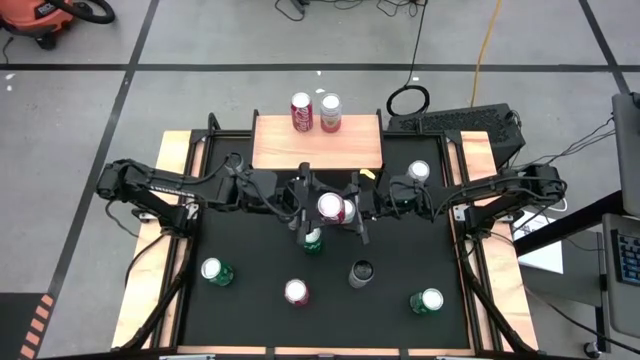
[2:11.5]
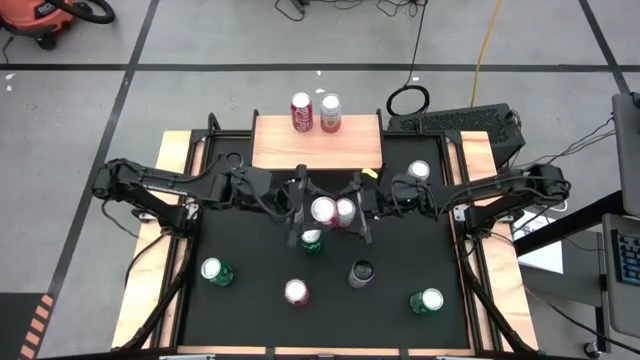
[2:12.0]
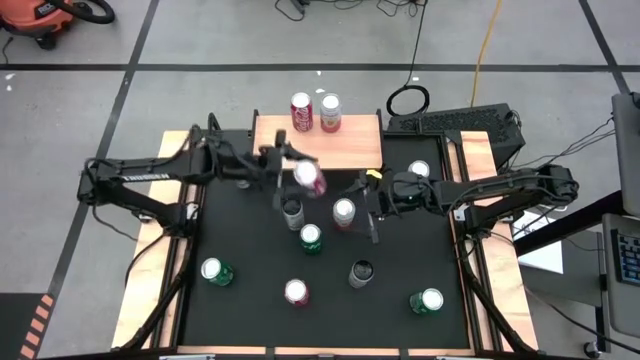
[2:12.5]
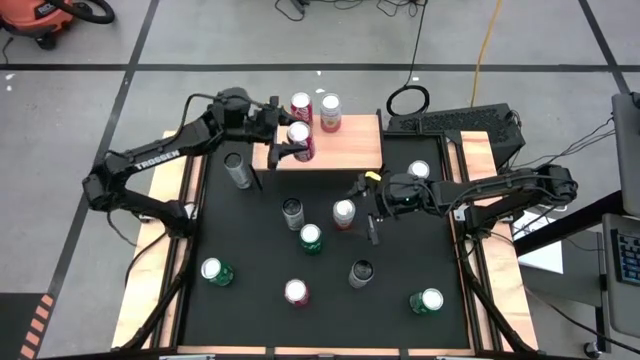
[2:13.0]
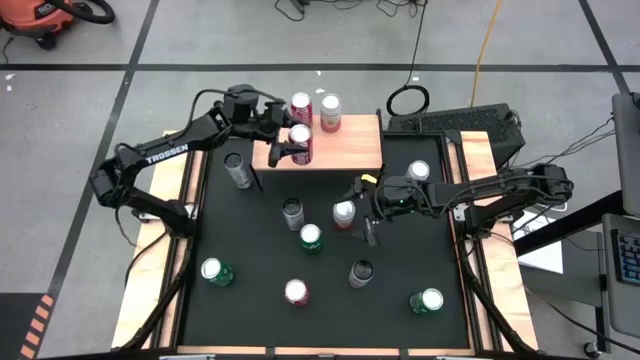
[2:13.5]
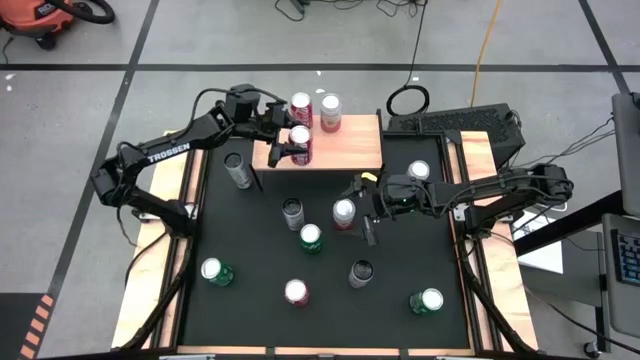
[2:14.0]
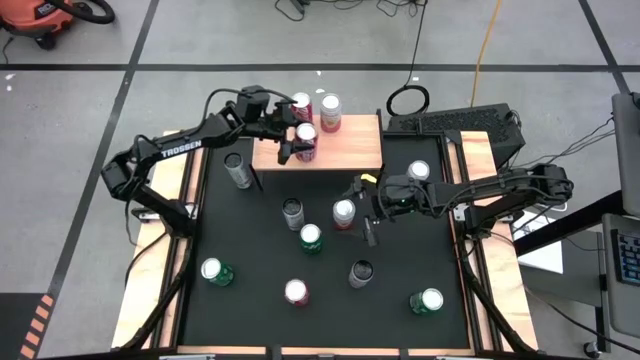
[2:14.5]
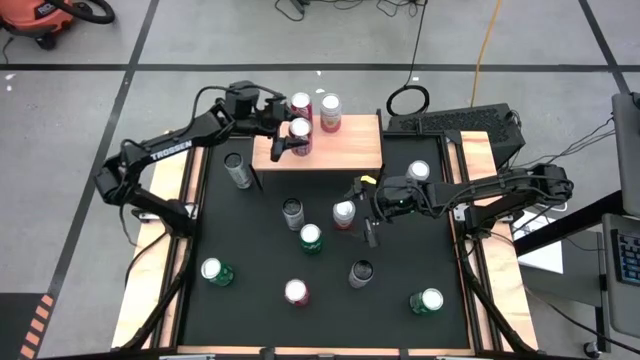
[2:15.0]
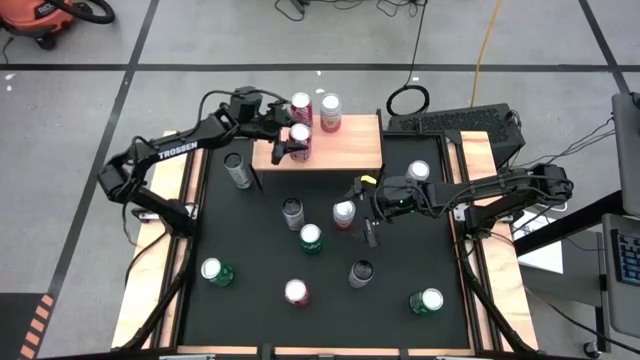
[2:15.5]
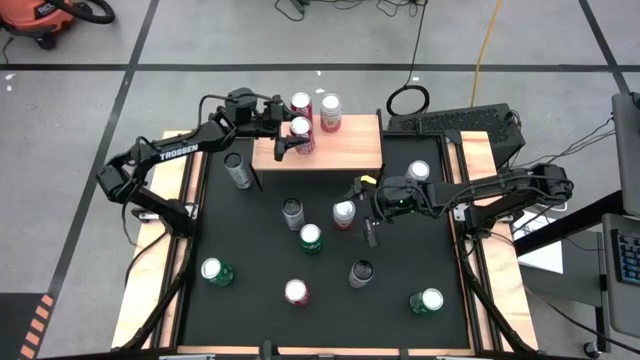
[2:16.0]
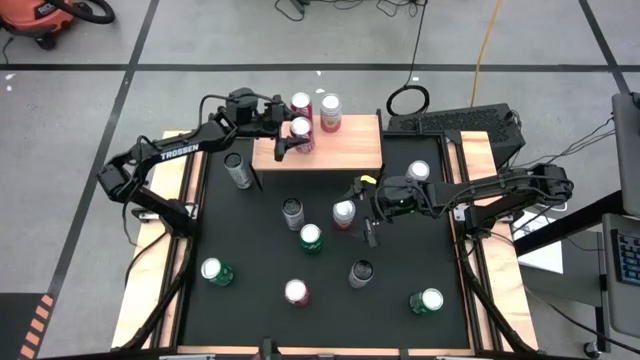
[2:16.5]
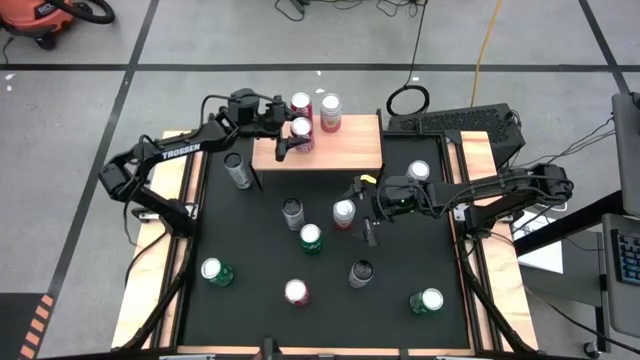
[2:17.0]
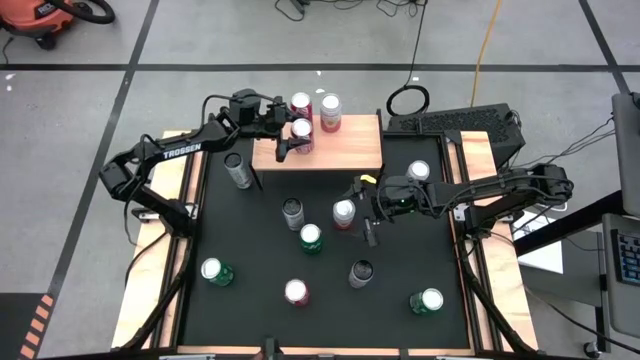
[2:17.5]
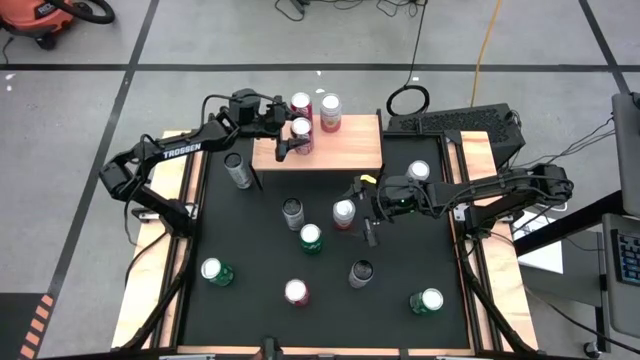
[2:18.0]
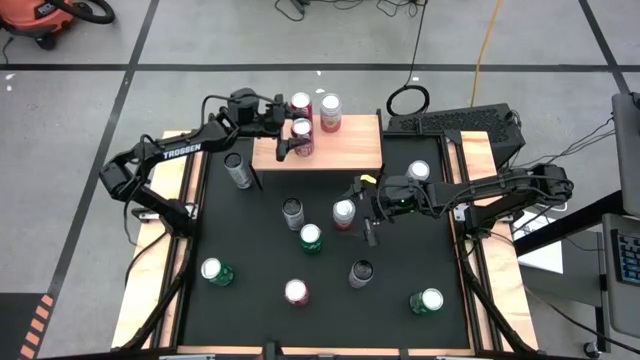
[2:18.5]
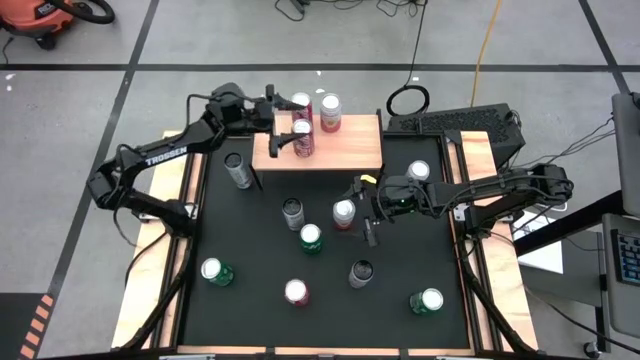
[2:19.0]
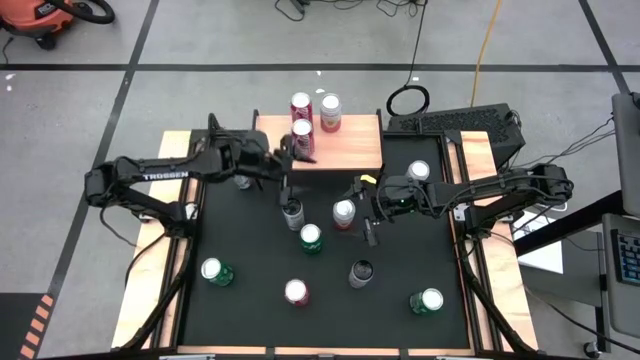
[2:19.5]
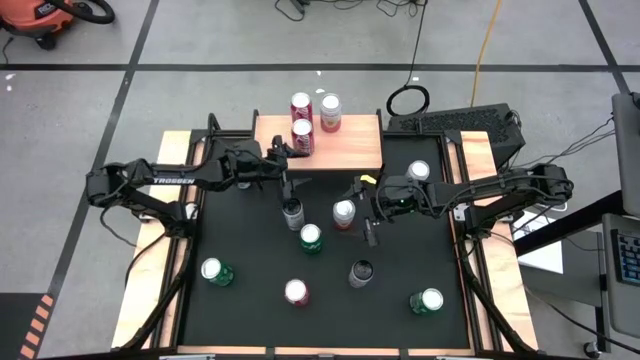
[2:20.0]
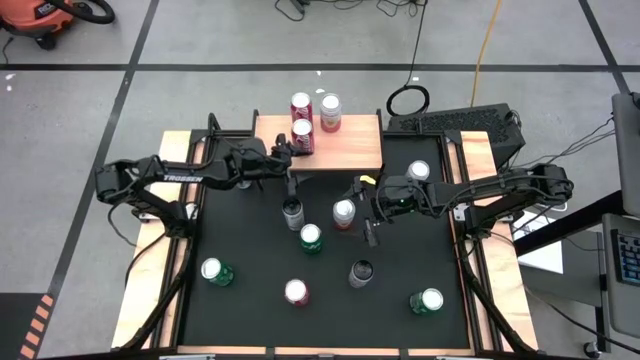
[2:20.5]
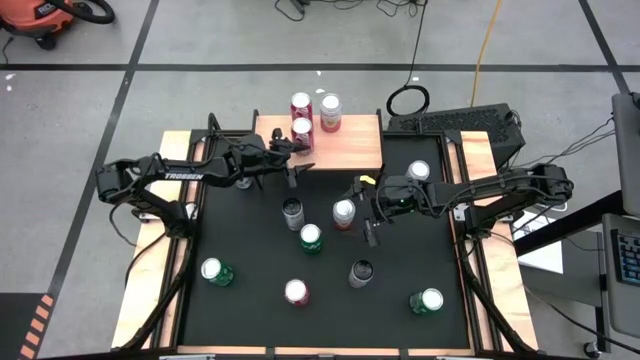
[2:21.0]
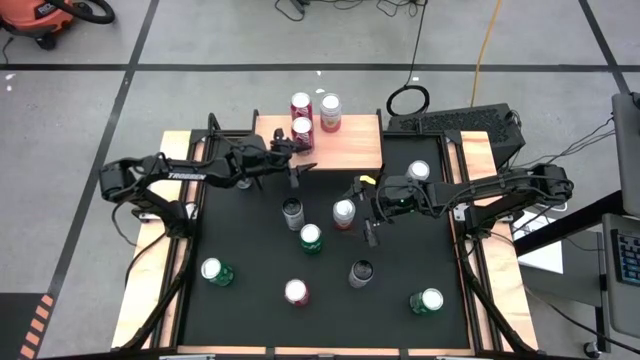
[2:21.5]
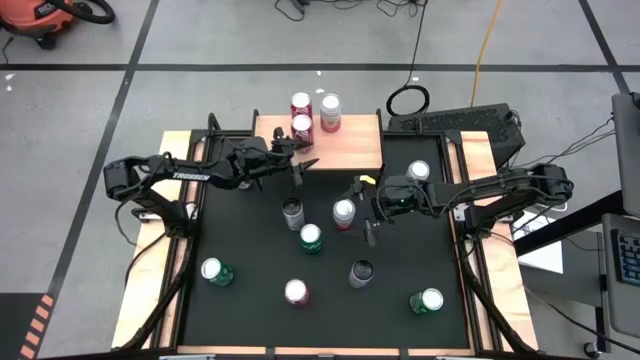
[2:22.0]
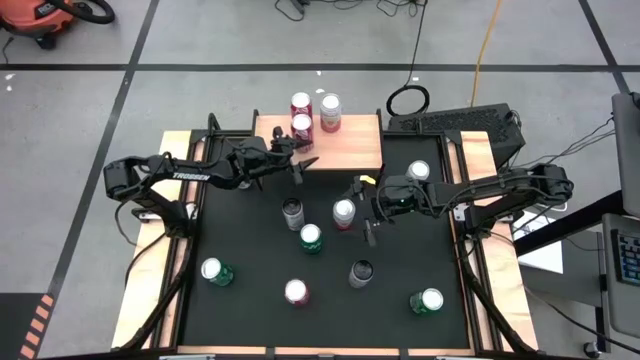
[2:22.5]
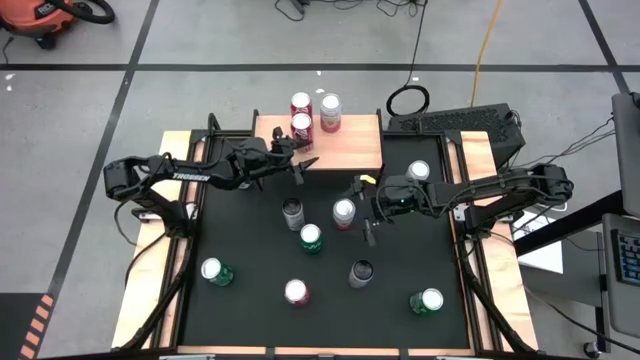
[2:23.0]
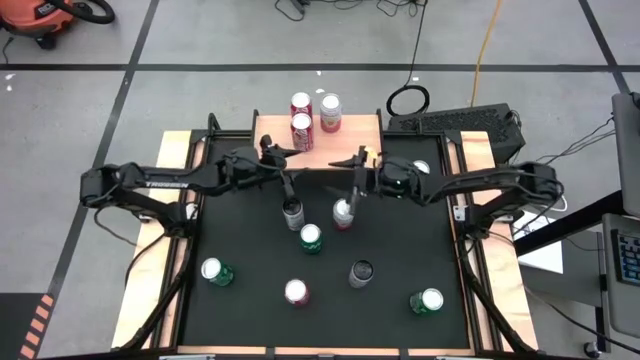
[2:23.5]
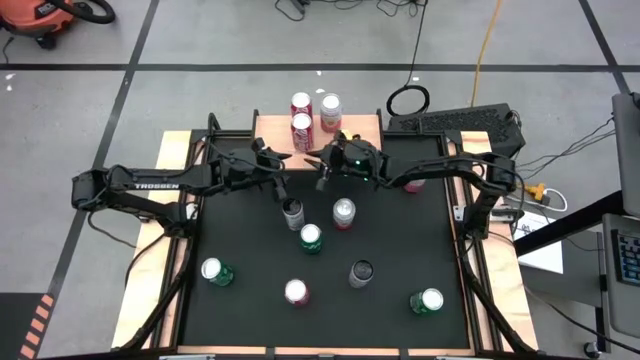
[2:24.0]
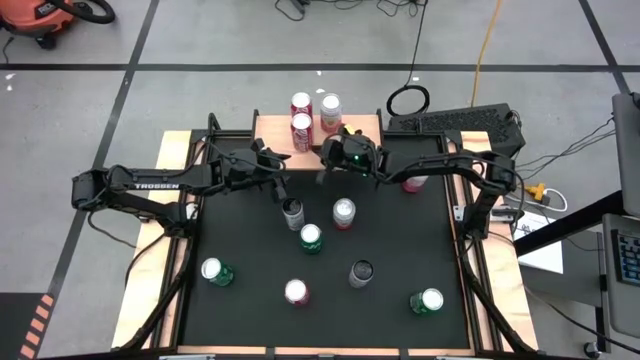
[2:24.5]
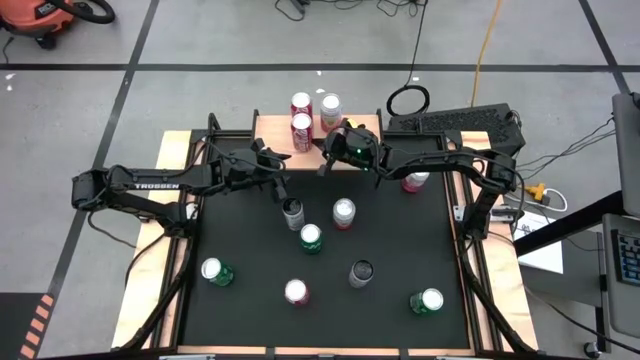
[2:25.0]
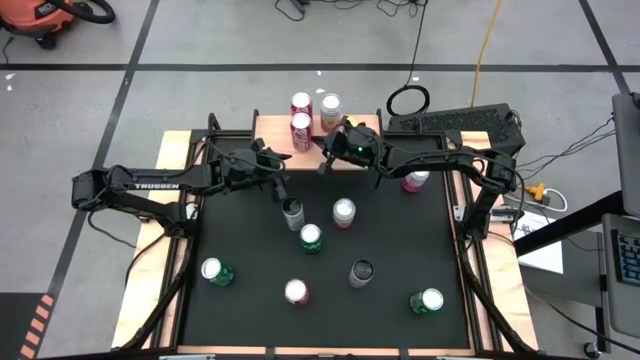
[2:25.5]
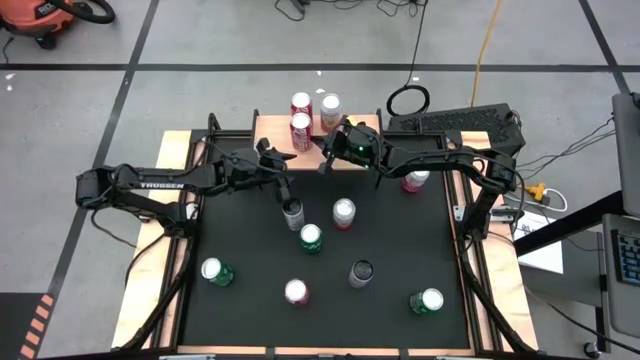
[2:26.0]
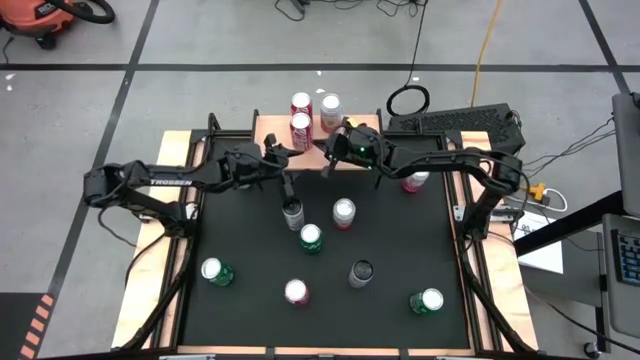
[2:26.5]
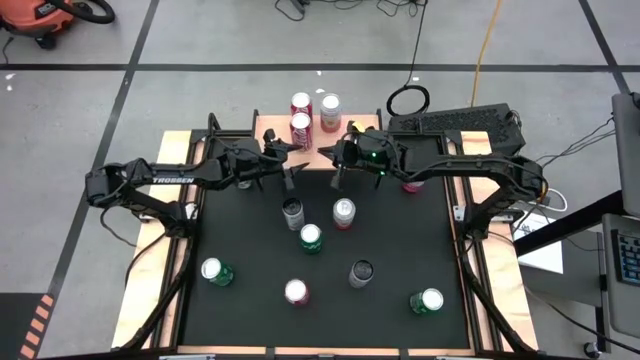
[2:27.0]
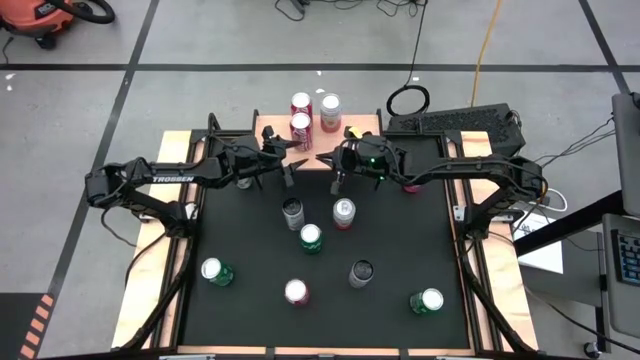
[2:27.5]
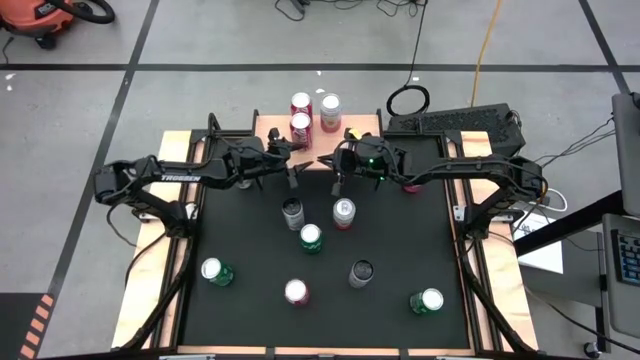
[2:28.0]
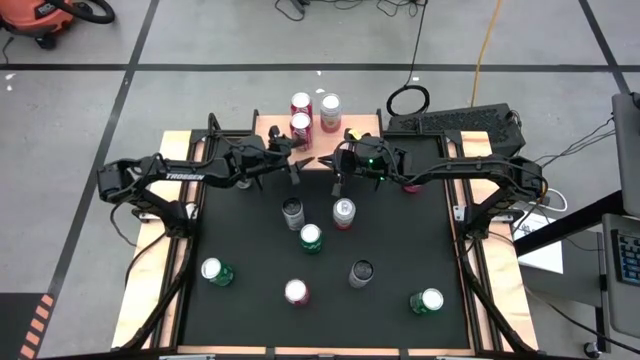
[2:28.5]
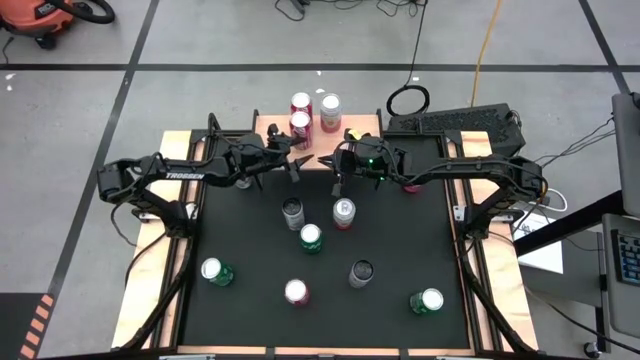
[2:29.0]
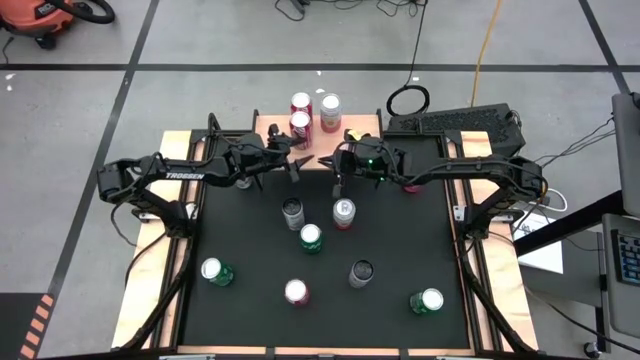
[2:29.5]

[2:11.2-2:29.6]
Task: Place canned beverage on shelf
Put the top red soda can on the shelf aligned with the other red soda can

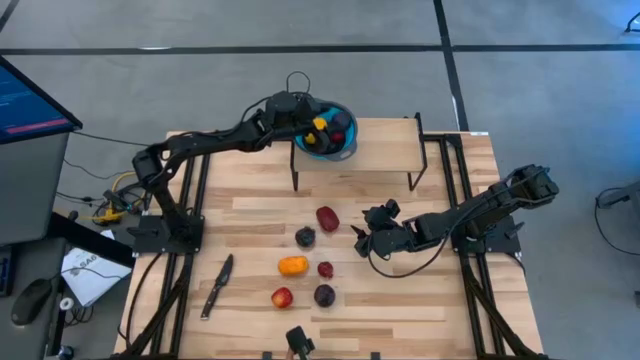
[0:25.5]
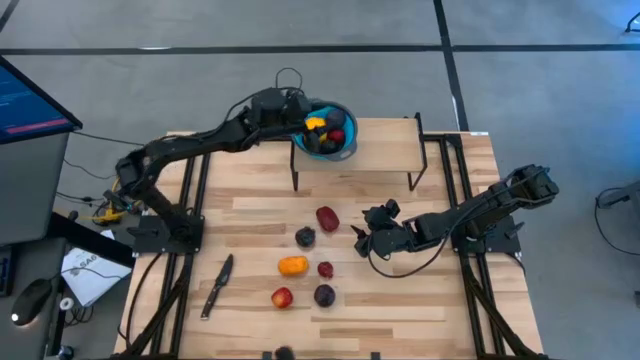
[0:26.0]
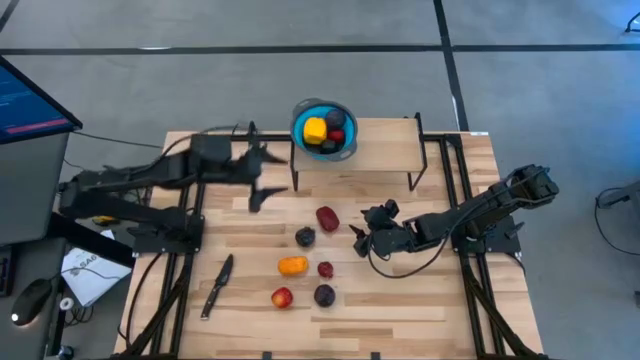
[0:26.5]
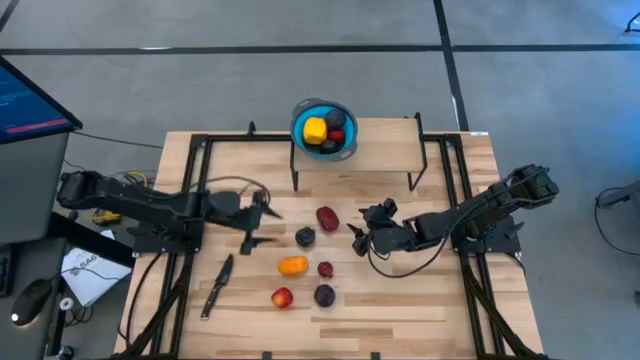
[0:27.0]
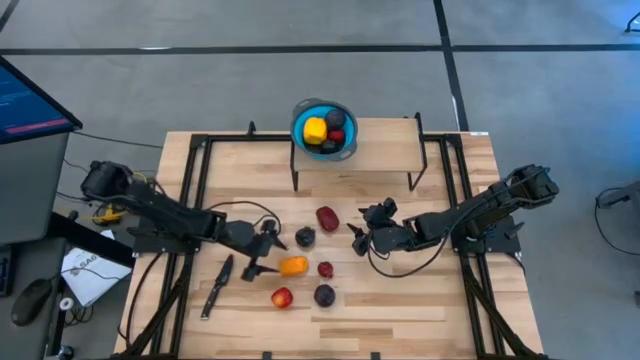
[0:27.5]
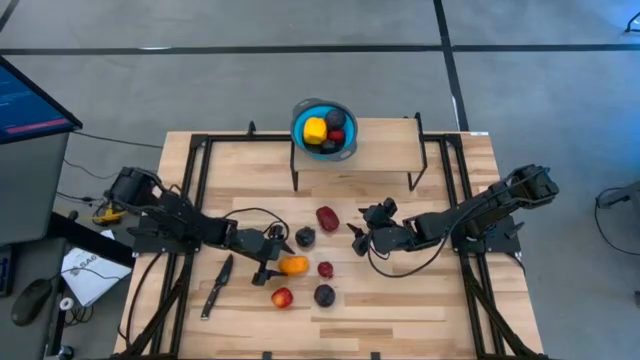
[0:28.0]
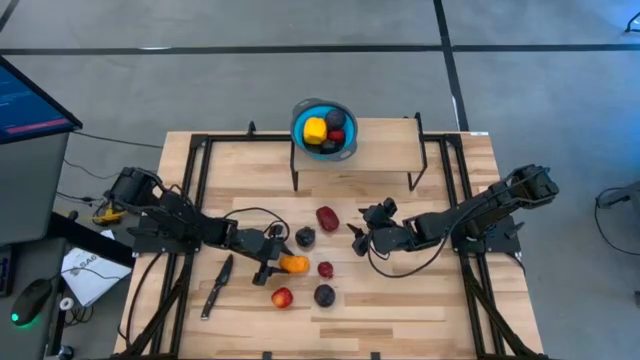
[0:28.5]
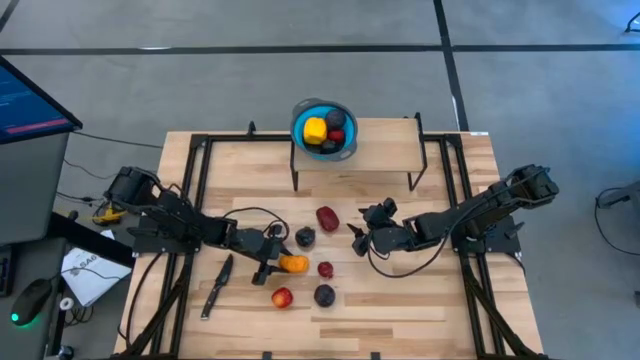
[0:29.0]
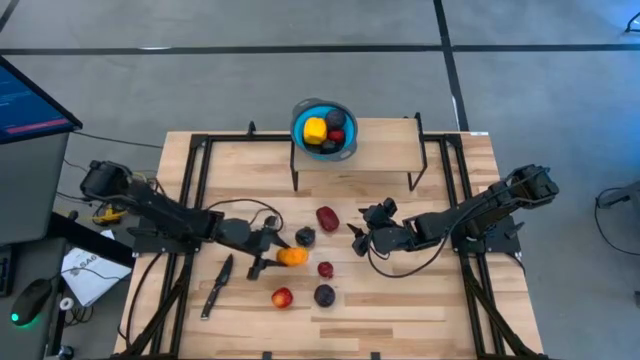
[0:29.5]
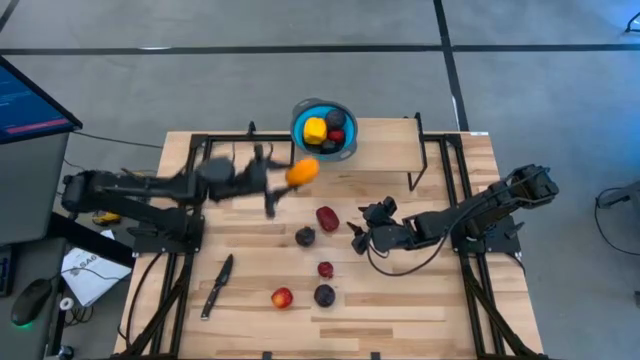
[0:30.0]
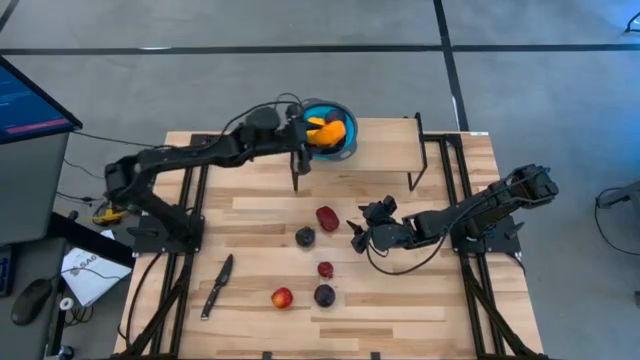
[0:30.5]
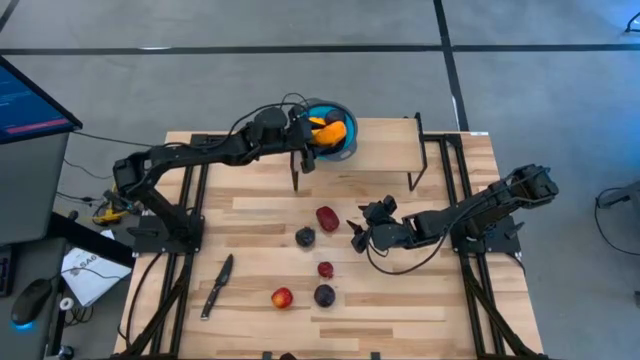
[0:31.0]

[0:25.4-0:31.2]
Task: Pick & Place Fruit
Put the yellow mango into the blue strainer bowl on the shelf
